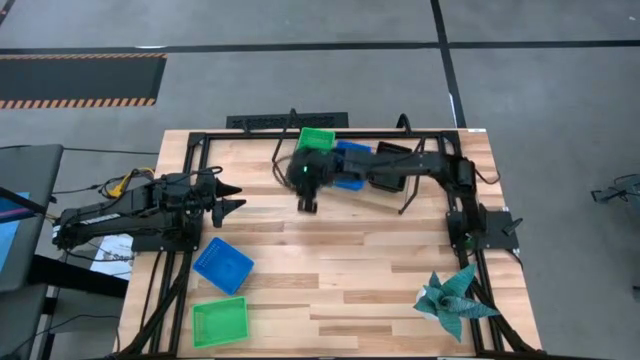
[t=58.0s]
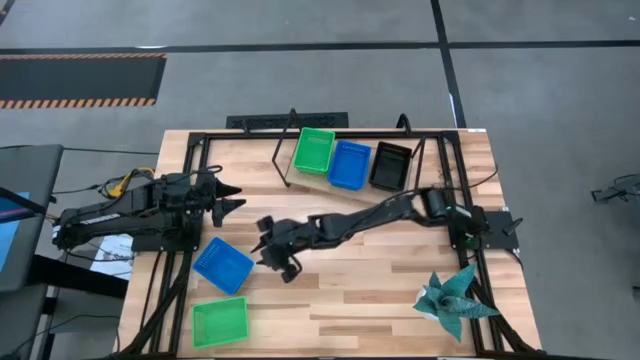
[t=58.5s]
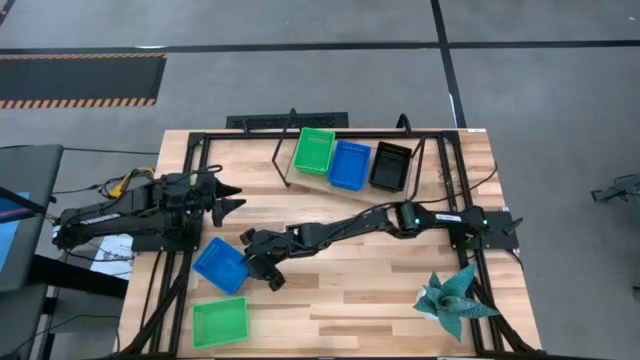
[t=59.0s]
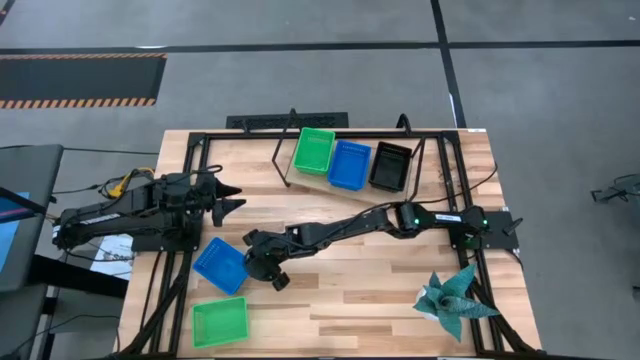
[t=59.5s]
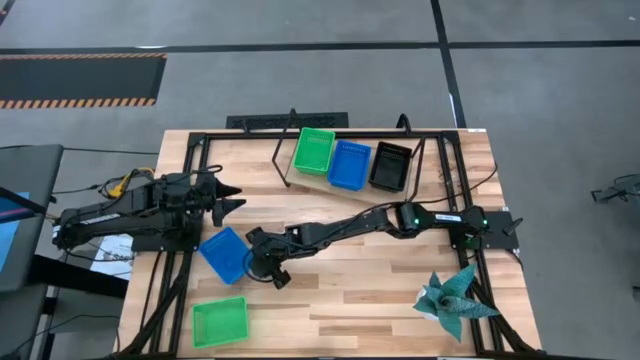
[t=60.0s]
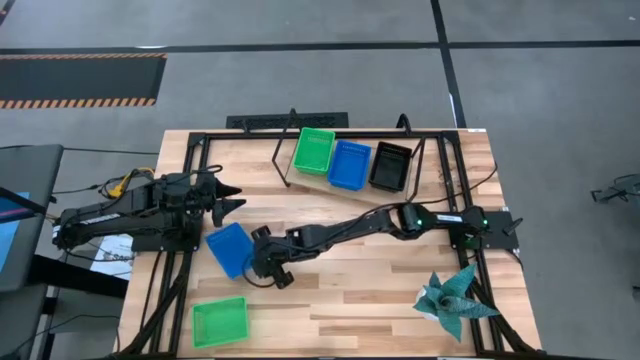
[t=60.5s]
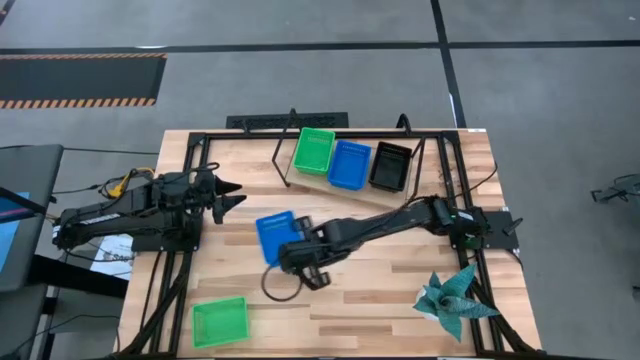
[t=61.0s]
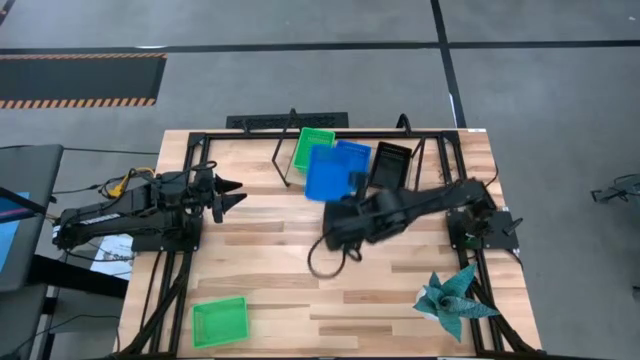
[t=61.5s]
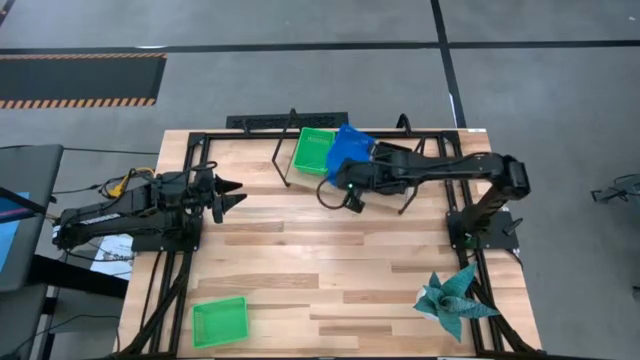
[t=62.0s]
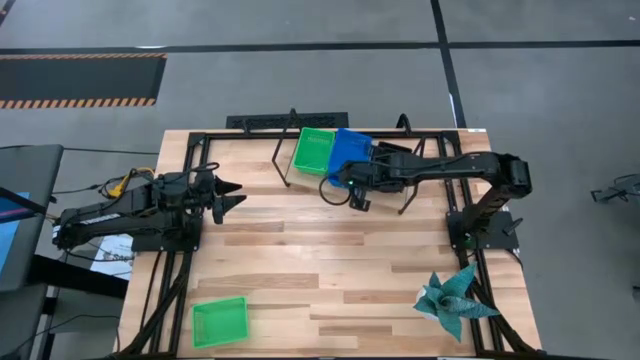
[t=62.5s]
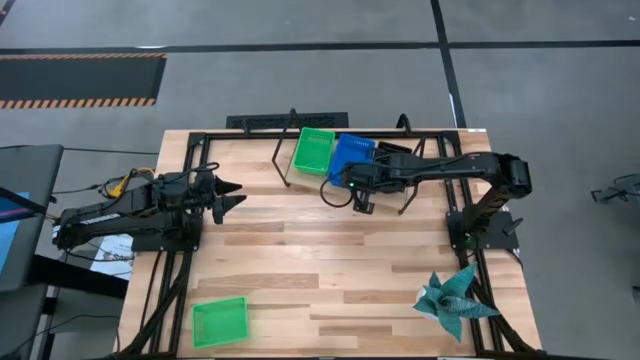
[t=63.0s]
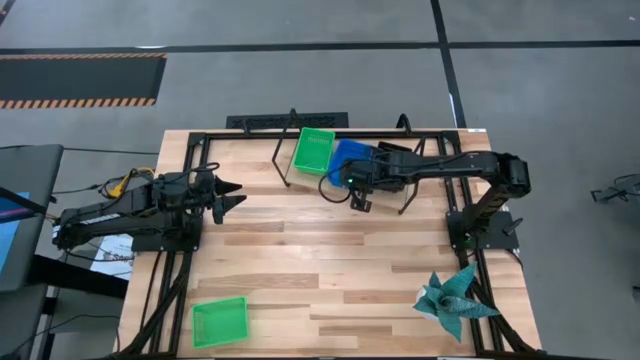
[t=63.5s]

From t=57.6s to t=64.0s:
Task: Stack baskets on shelf by color
Stack the blue bin on top of the blue bin on the shelf

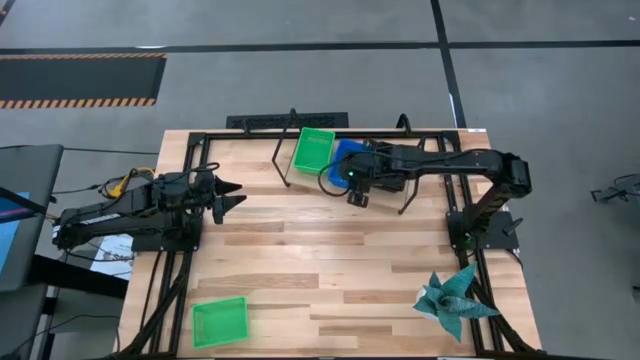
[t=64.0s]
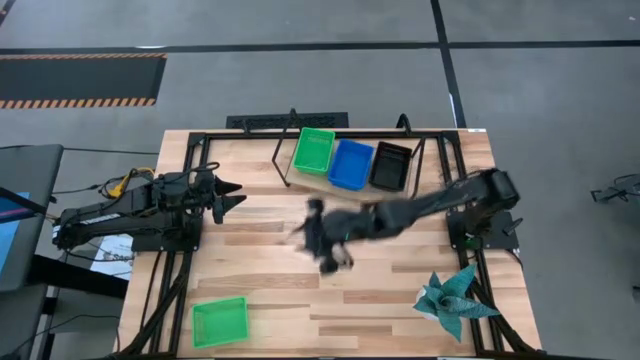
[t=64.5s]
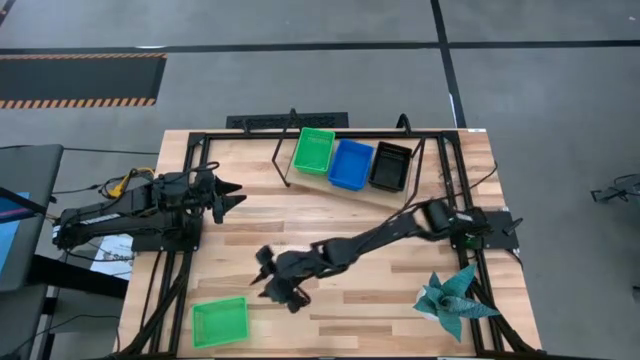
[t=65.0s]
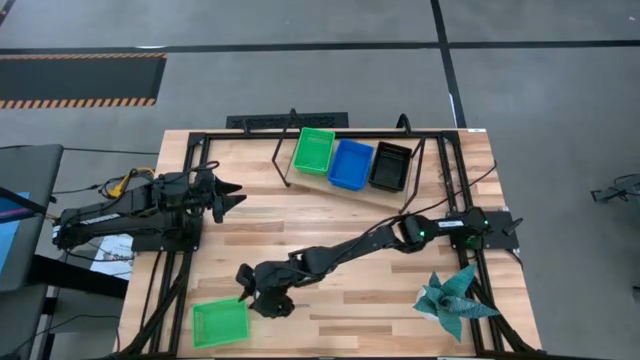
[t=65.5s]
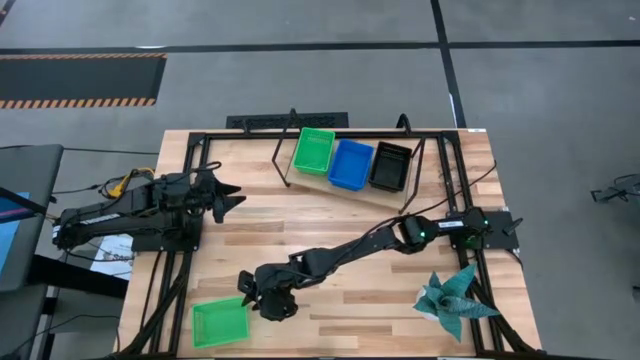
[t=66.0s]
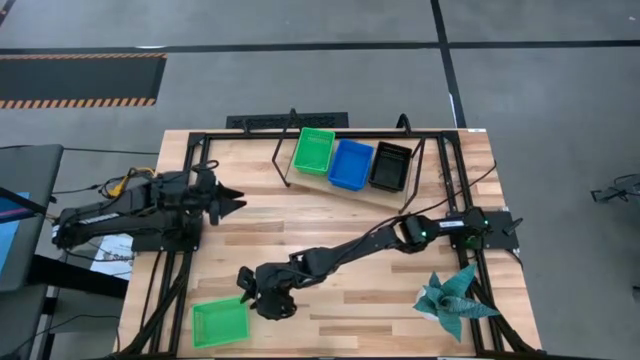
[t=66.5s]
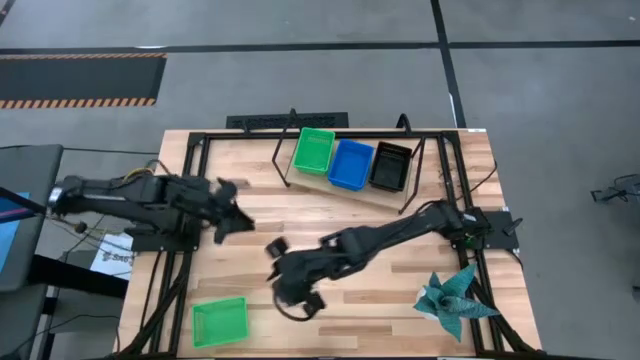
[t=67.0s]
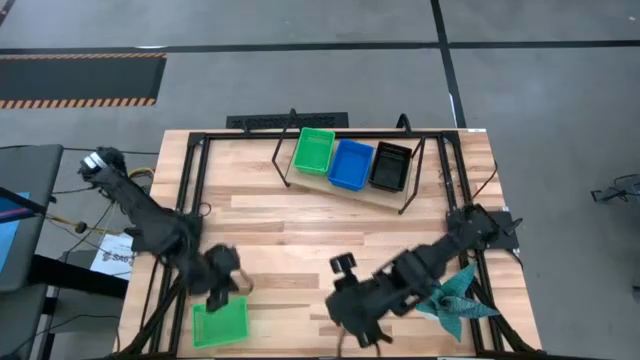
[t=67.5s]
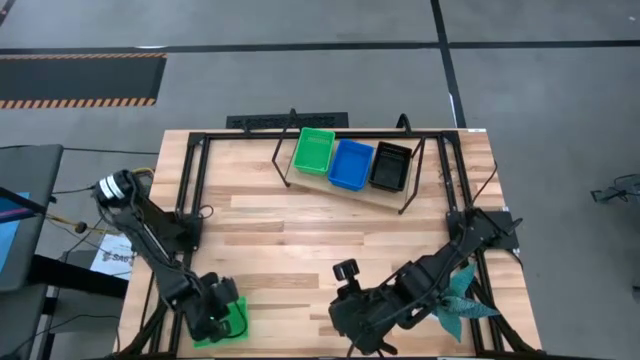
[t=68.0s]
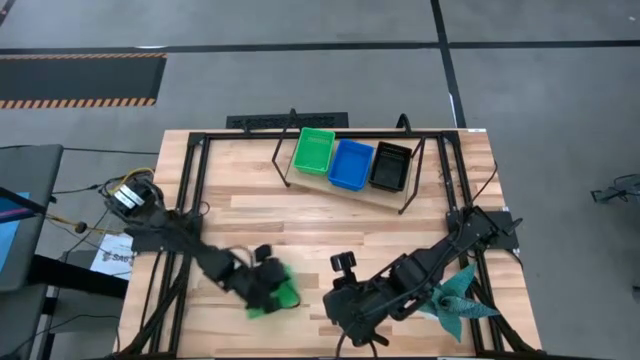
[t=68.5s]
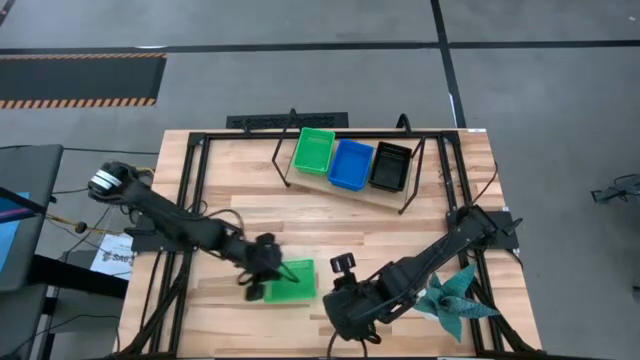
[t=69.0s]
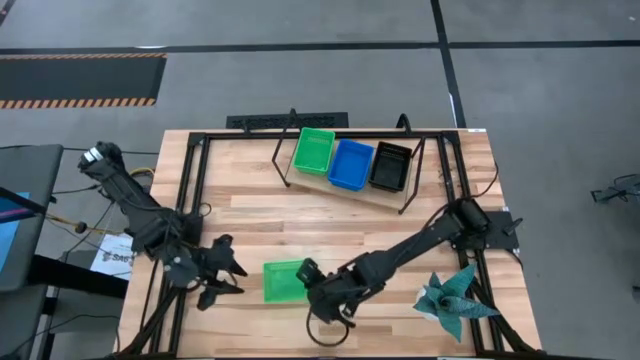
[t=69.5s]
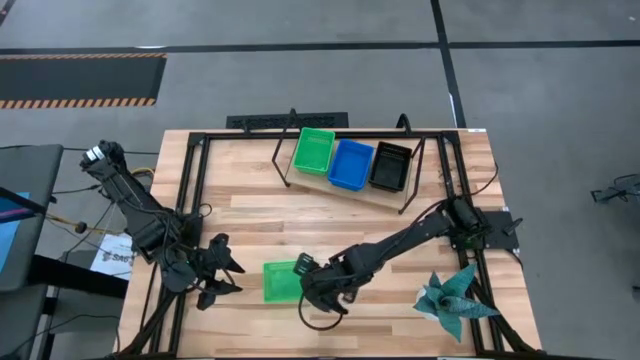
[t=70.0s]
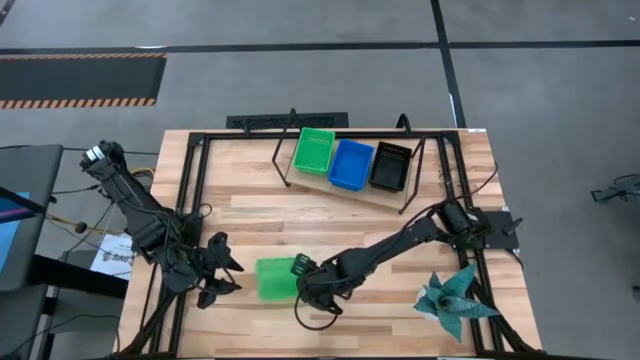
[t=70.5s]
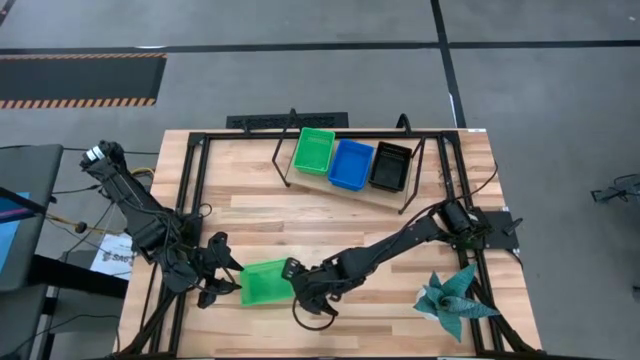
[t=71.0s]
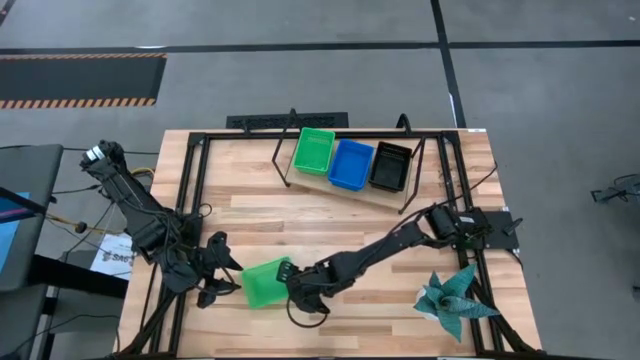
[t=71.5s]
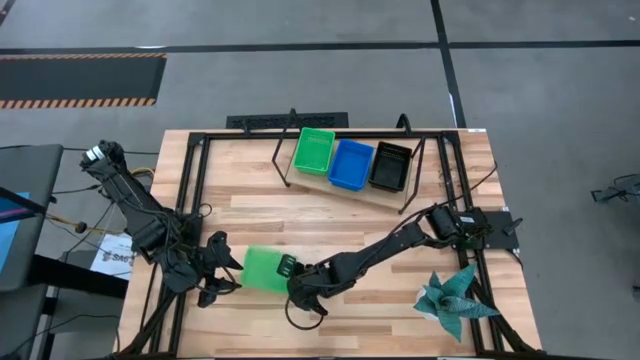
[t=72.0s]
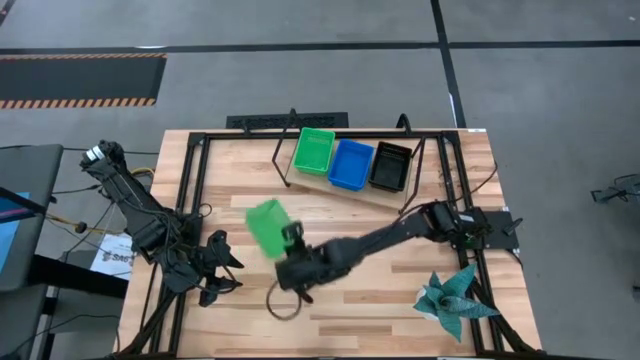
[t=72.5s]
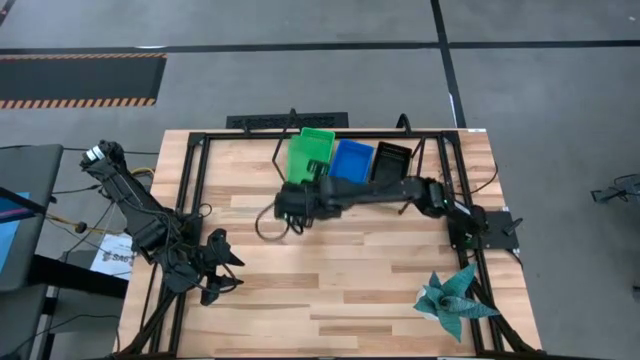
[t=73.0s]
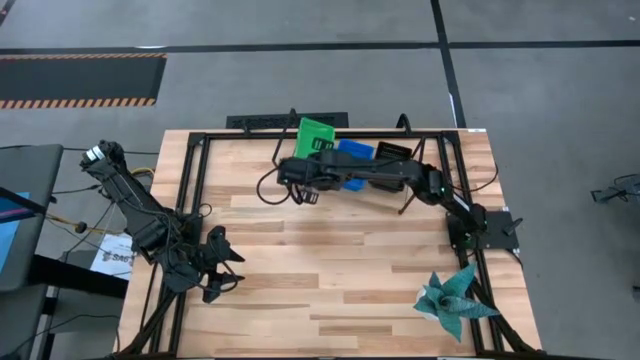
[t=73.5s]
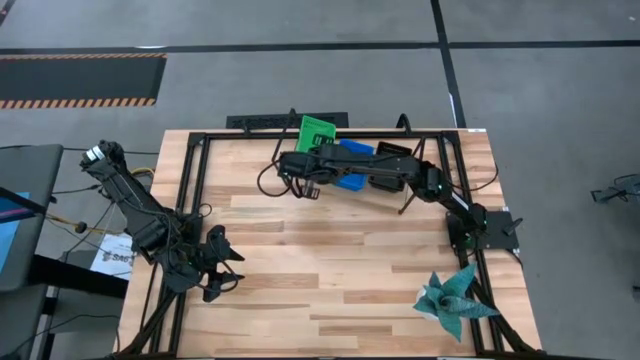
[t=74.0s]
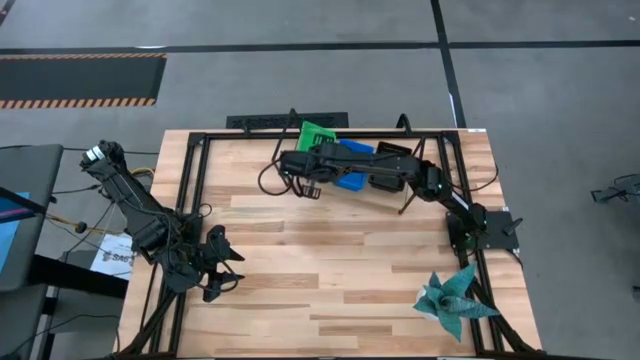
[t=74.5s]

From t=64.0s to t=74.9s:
Stack the green bin on top of the green bin on the shelf

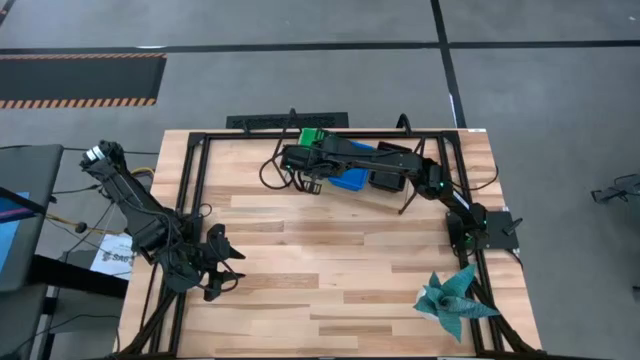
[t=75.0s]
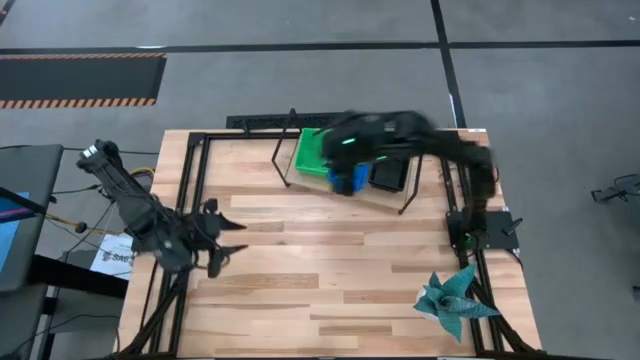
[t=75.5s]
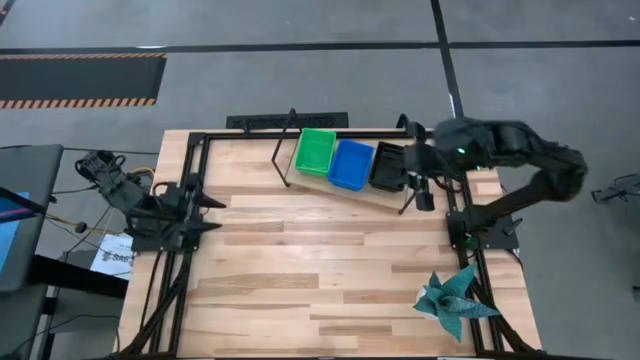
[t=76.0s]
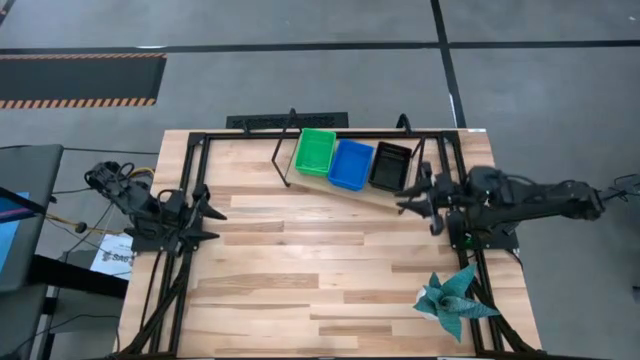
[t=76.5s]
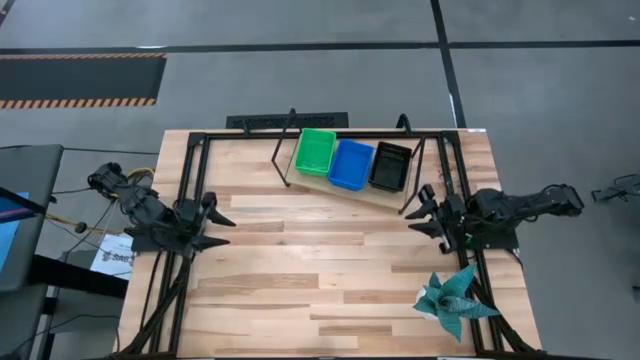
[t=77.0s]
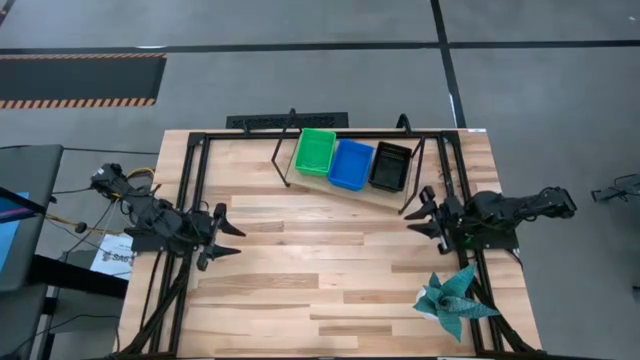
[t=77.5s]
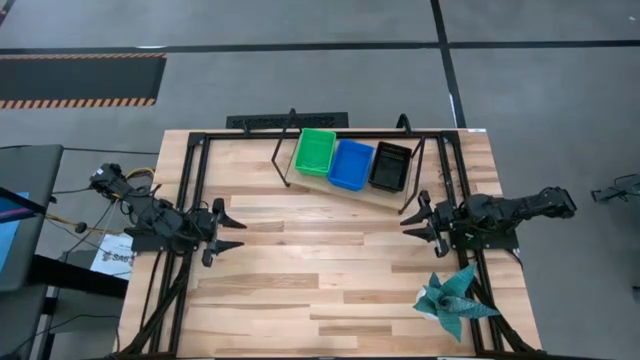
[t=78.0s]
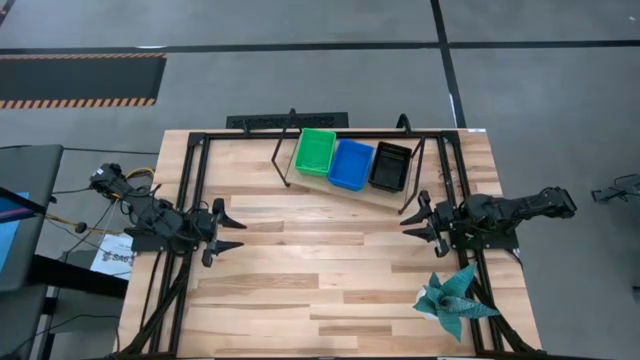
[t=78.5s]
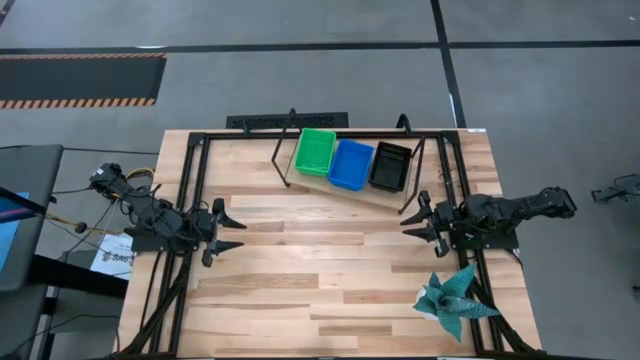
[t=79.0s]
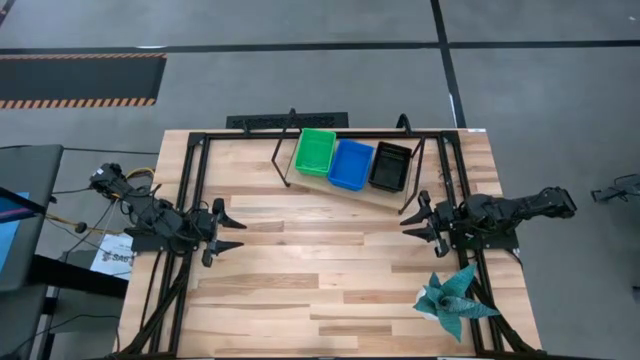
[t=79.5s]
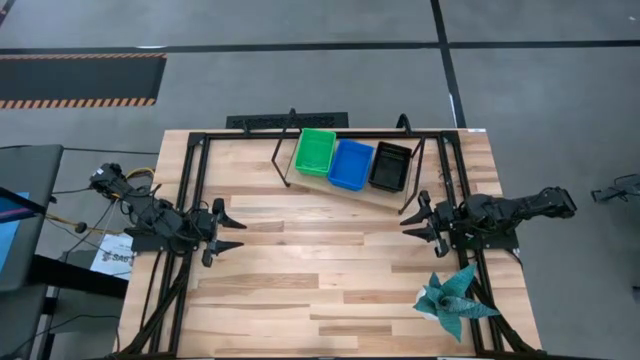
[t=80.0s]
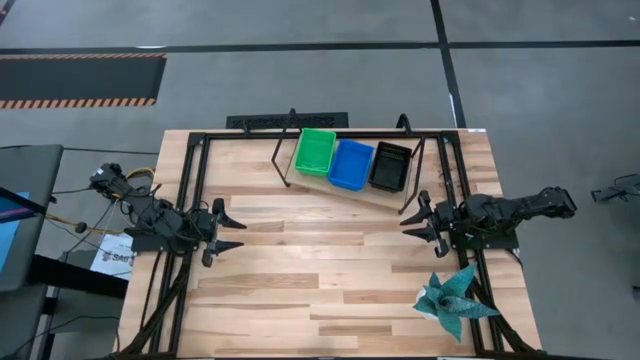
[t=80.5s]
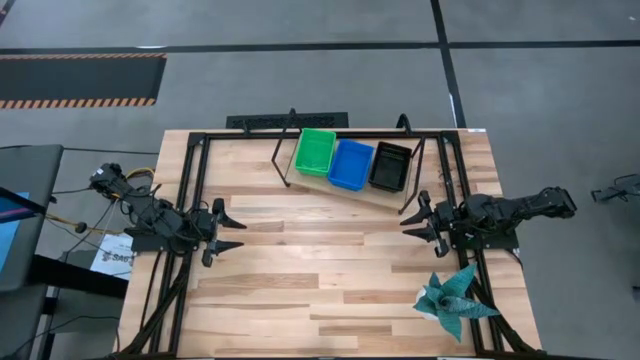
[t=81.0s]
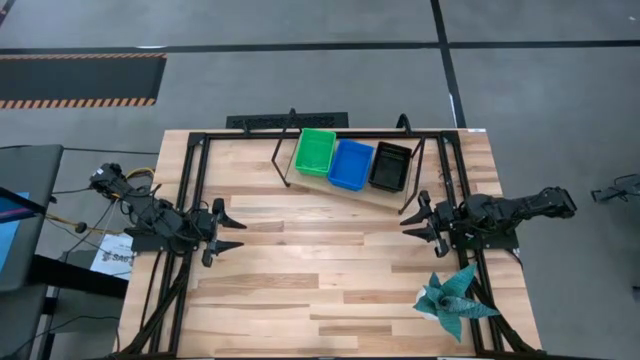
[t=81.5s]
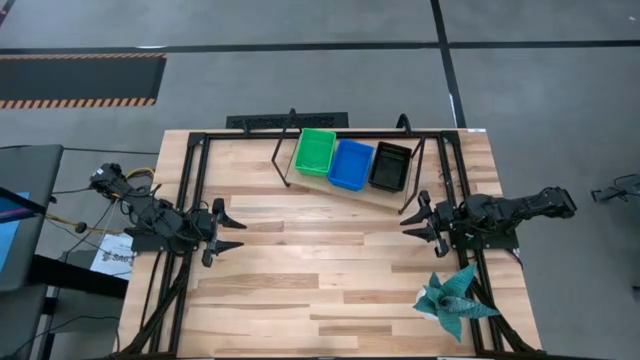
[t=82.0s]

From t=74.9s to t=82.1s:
Return to Home Position
